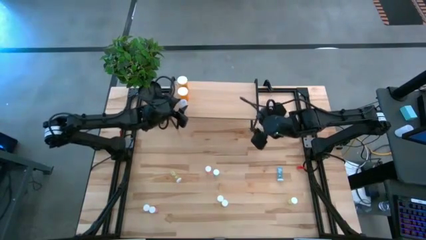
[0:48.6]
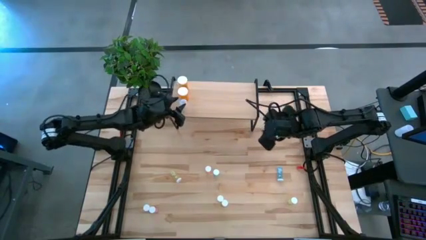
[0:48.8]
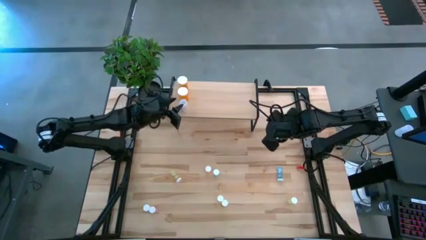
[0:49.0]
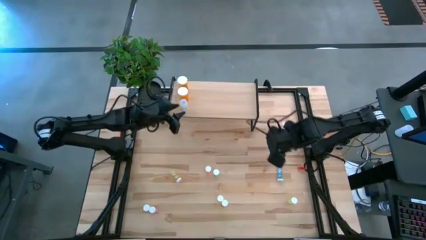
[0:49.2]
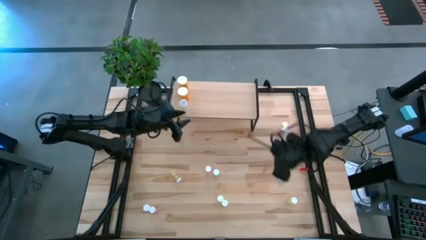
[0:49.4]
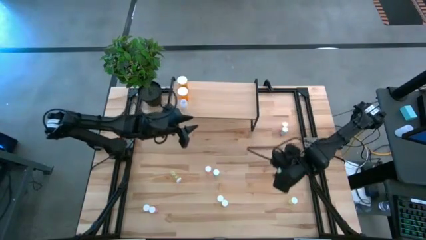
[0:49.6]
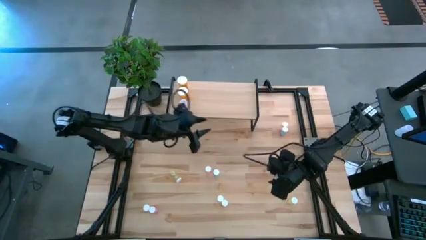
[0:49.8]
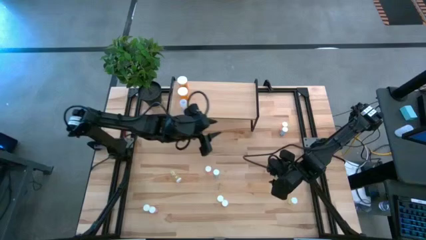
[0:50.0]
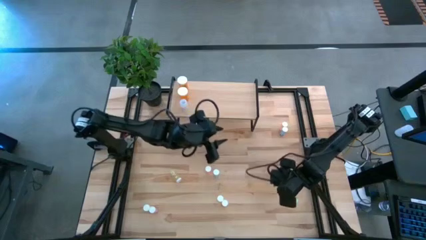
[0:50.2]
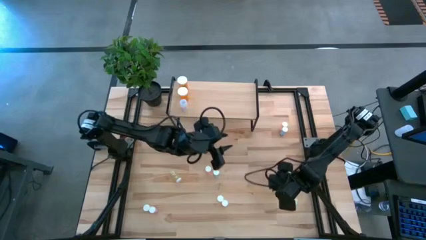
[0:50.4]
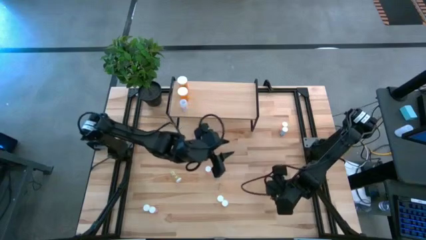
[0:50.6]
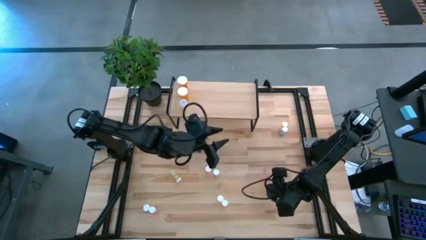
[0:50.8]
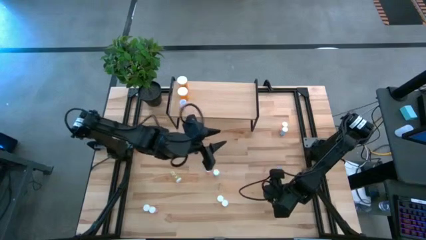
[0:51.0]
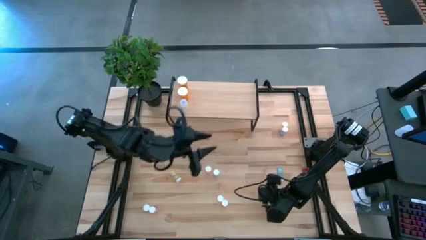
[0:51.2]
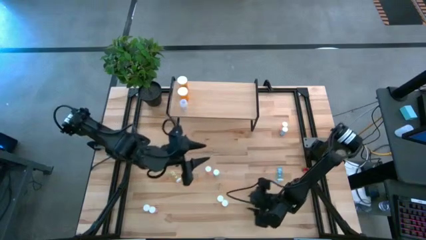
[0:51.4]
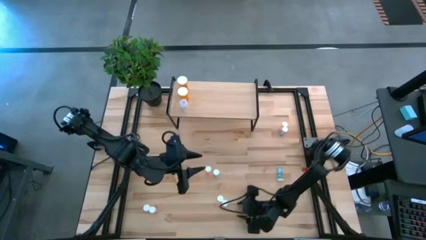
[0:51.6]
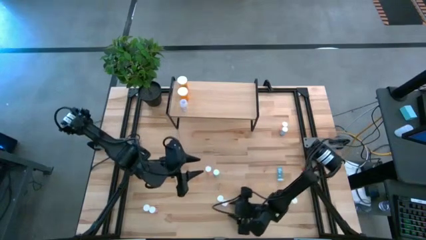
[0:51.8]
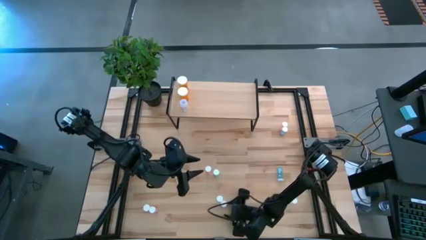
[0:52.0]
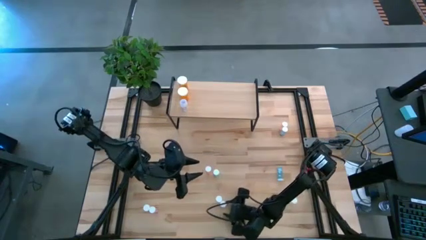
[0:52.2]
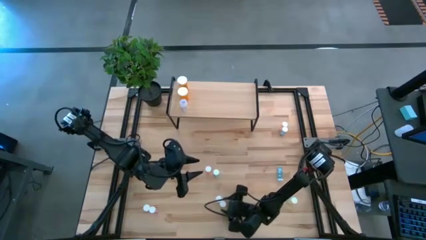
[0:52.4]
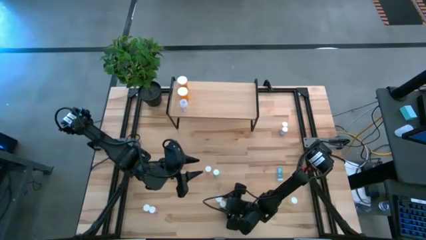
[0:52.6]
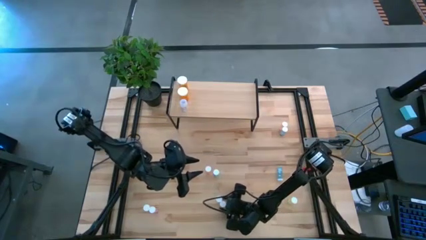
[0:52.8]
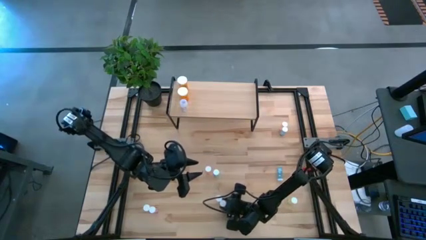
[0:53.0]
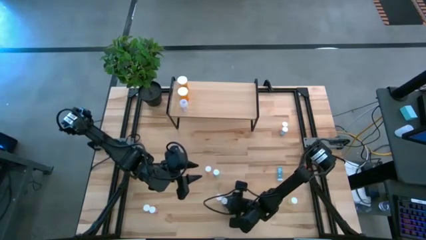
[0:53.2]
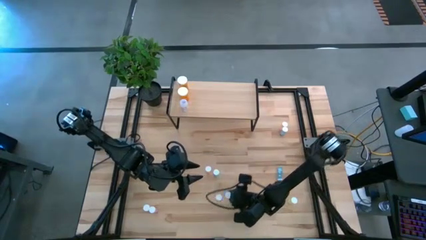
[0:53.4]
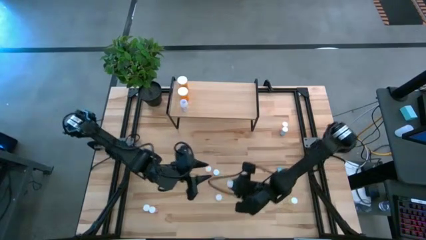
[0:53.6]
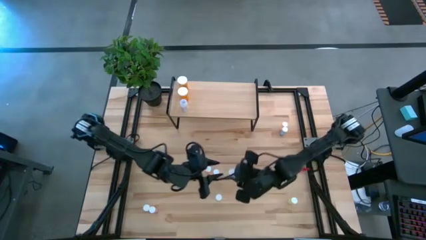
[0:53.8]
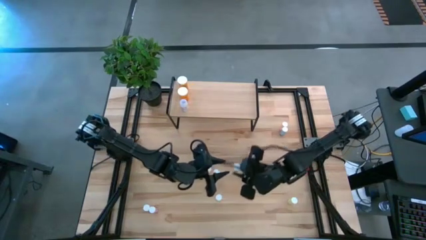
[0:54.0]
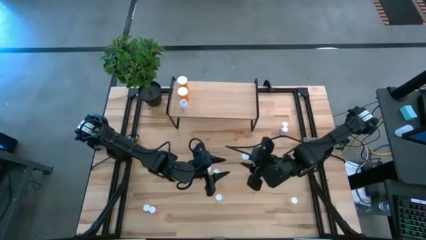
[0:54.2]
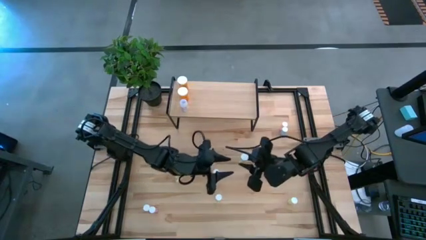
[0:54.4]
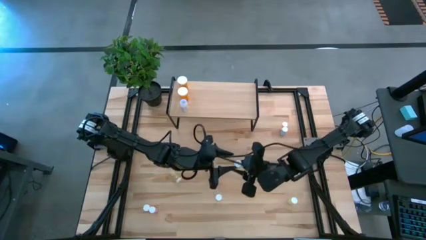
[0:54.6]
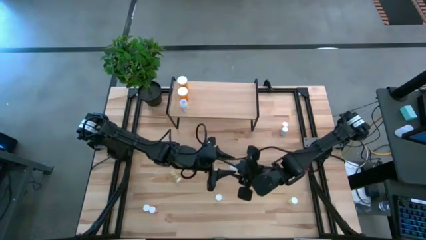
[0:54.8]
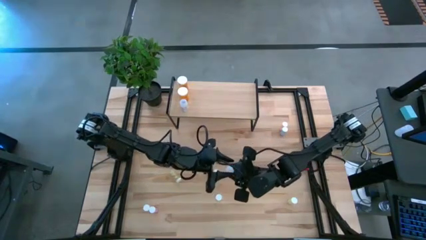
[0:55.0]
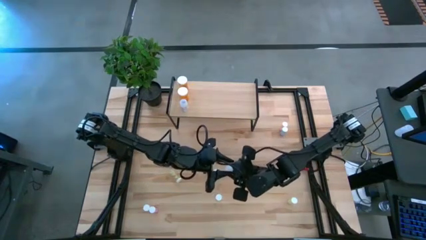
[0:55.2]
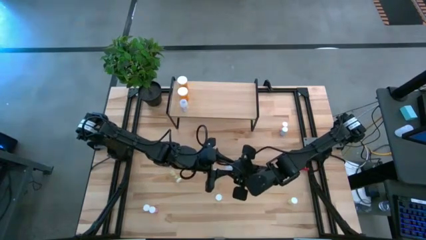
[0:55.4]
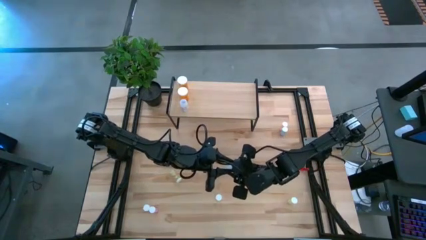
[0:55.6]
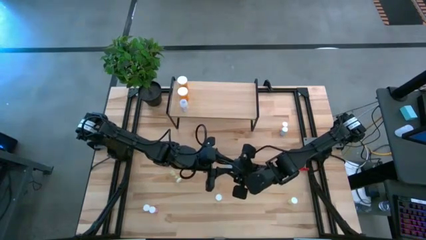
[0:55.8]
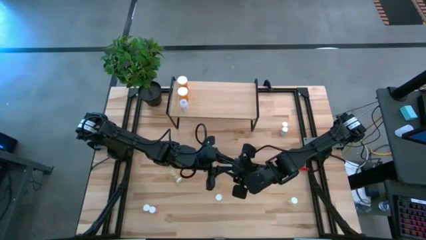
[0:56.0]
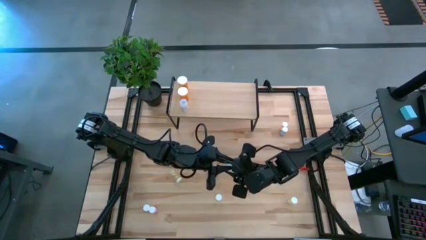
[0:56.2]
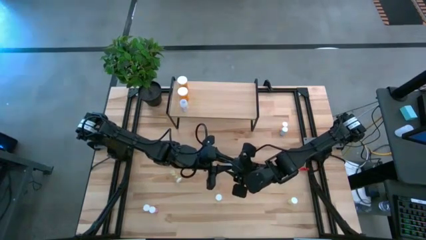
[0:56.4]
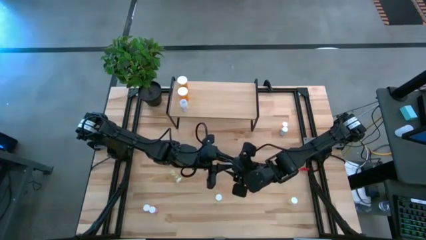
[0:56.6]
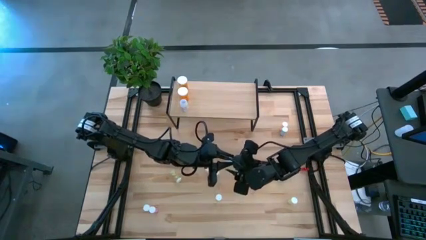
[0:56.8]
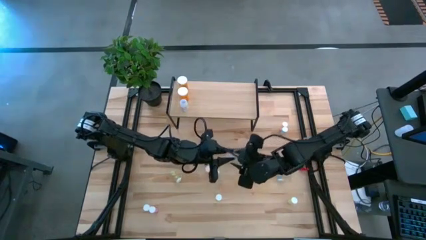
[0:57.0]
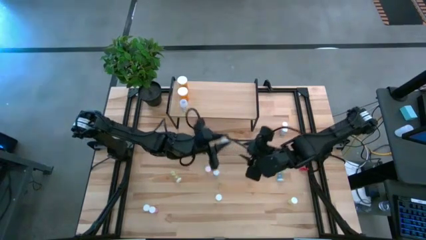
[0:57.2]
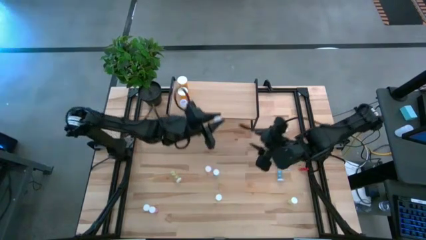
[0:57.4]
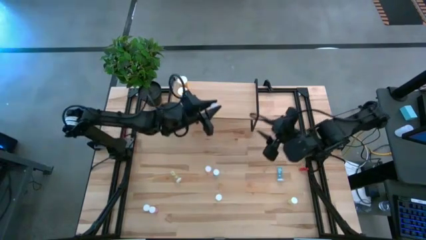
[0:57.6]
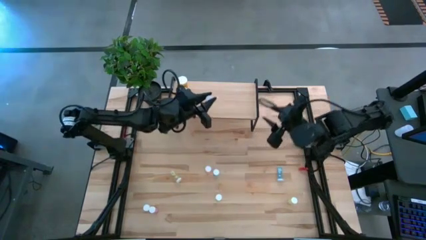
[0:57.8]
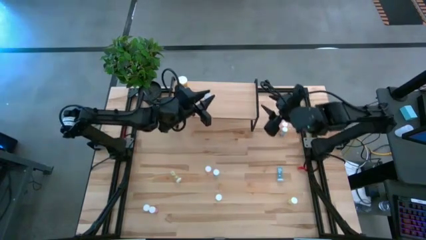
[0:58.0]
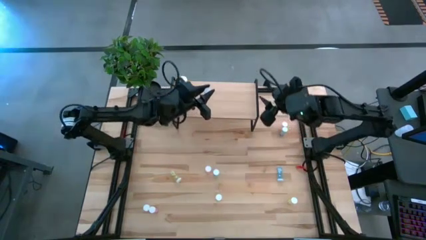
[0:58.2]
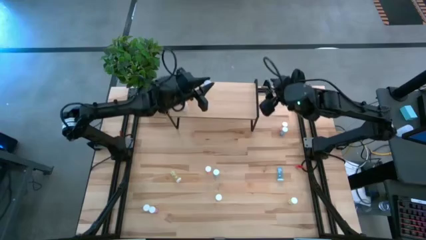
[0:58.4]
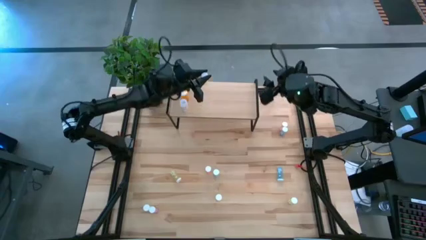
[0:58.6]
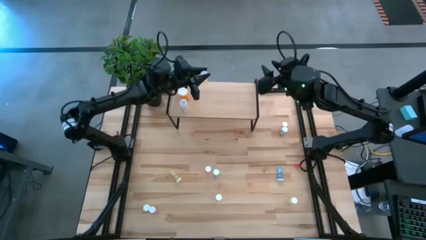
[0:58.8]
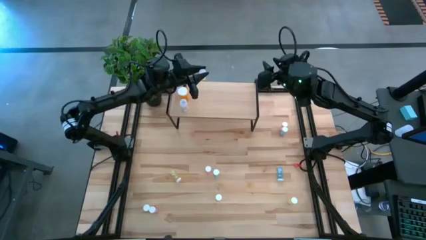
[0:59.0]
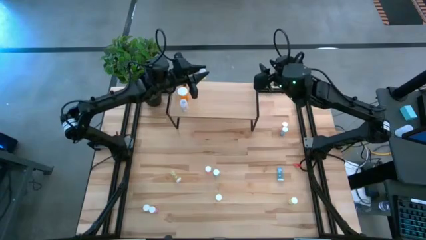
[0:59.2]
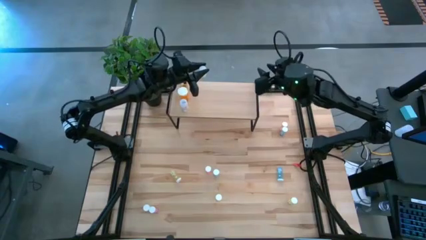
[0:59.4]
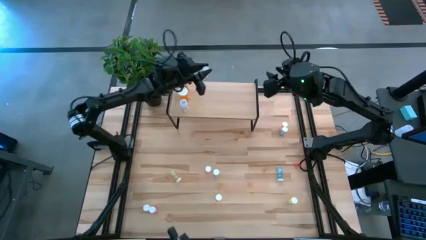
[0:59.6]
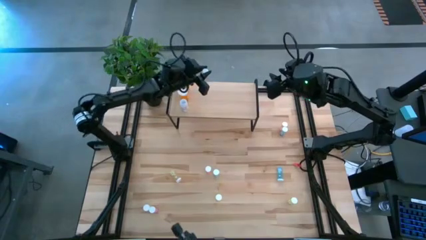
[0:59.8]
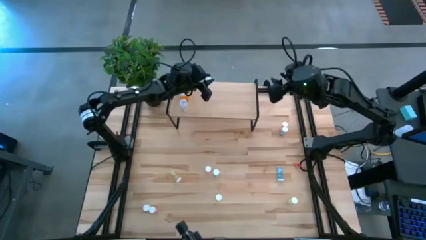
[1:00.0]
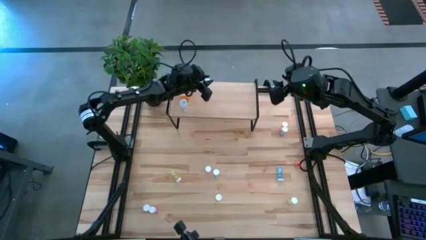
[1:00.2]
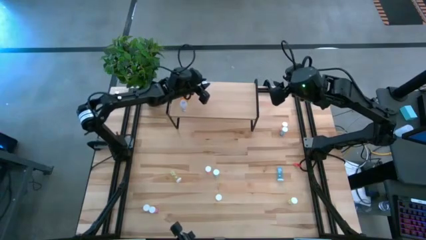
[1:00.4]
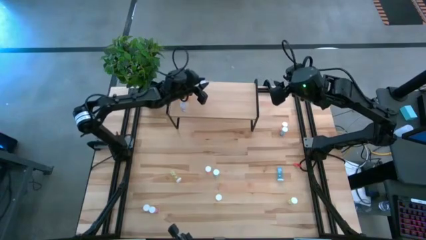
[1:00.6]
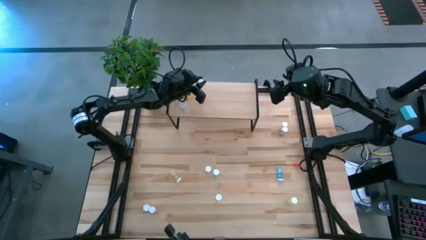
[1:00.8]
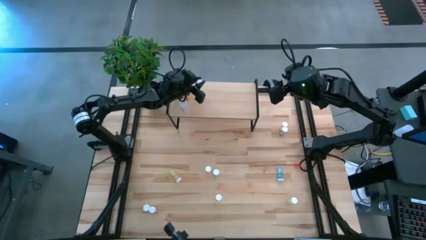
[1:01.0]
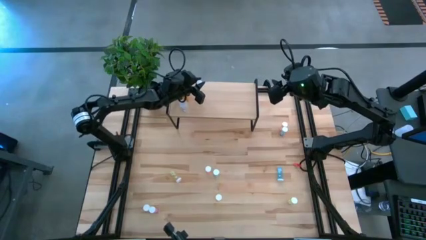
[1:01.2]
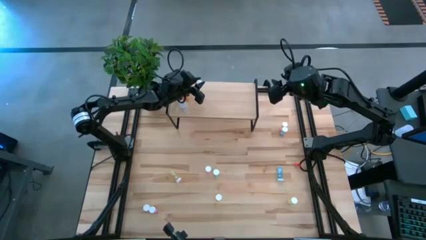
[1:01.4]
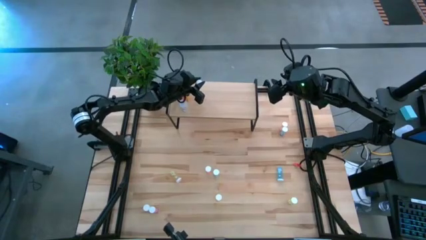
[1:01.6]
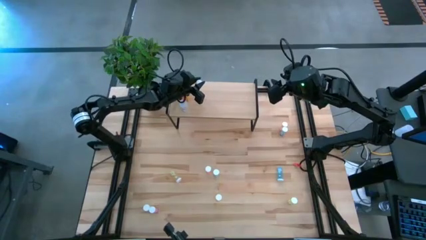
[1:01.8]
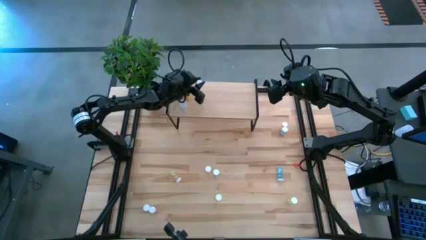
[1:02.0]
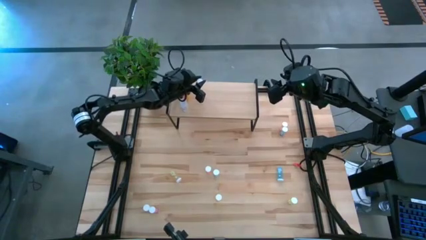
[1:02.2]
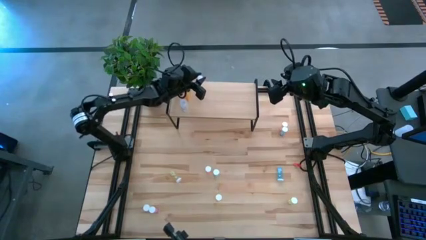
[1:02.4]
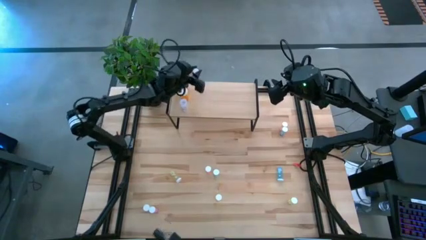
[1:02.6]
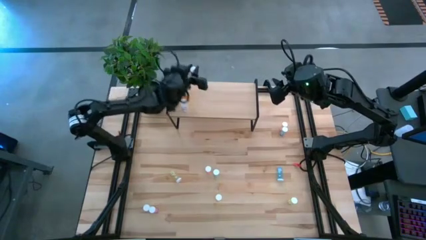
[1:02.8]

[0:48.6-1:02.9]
Task: Pick and place medicine bottles onto shelf by color
Put the yellow pill bottle on the shelf

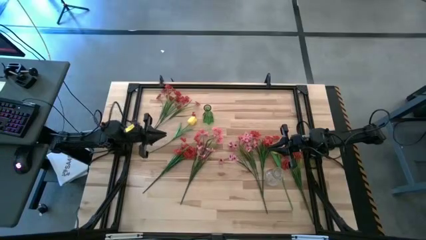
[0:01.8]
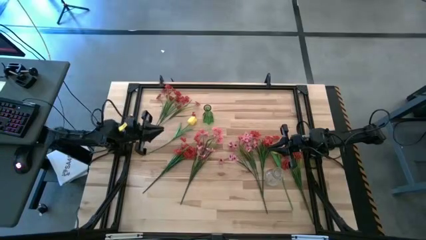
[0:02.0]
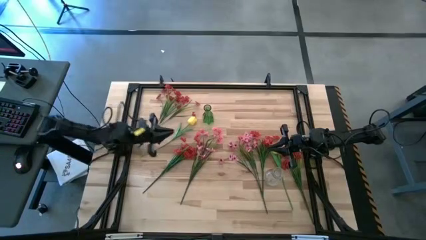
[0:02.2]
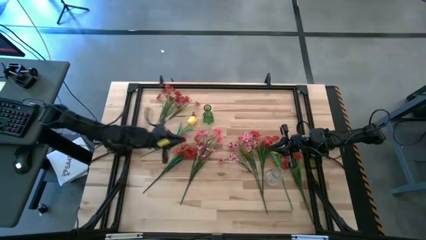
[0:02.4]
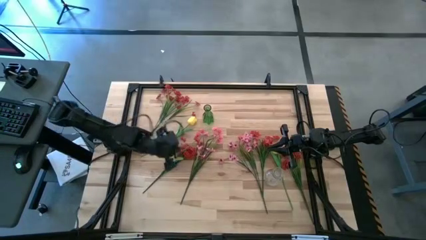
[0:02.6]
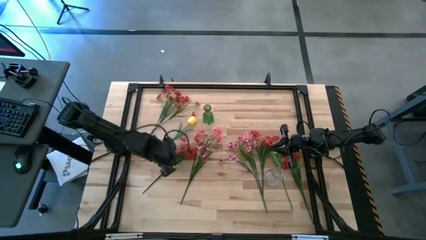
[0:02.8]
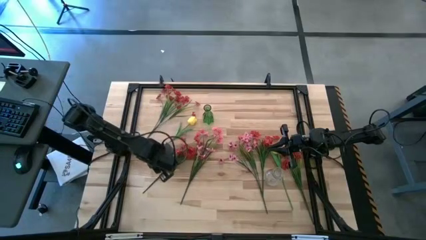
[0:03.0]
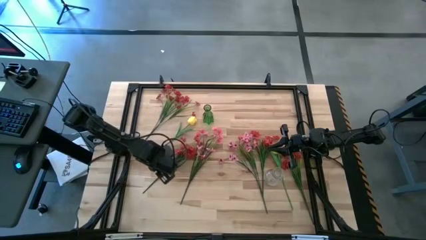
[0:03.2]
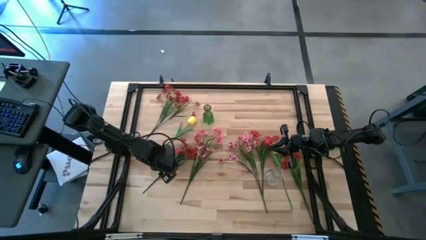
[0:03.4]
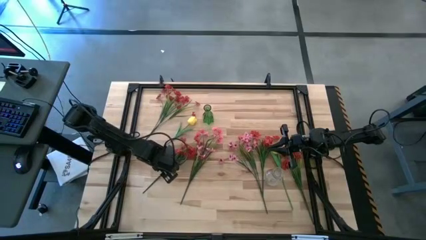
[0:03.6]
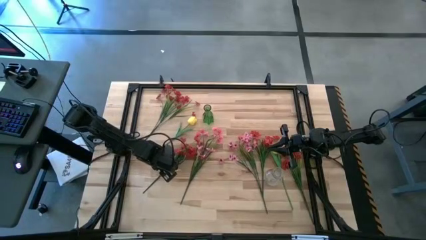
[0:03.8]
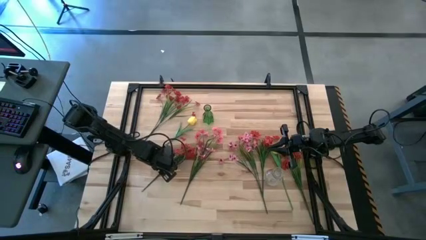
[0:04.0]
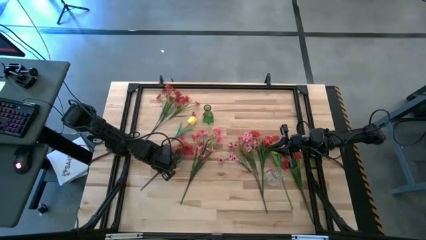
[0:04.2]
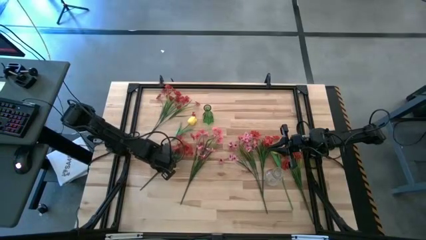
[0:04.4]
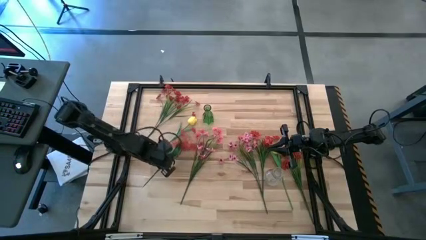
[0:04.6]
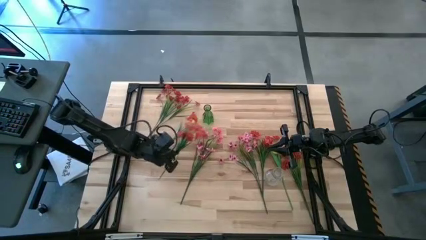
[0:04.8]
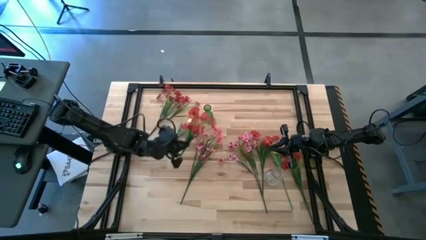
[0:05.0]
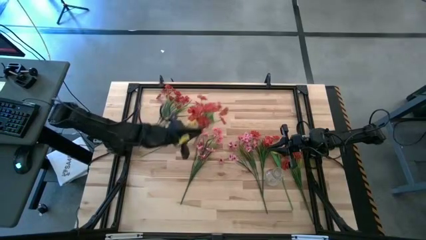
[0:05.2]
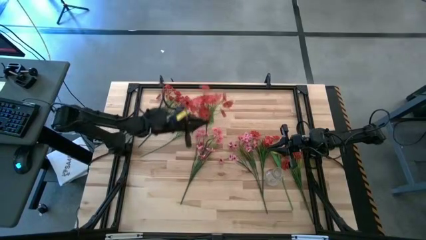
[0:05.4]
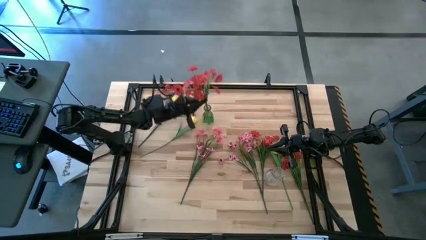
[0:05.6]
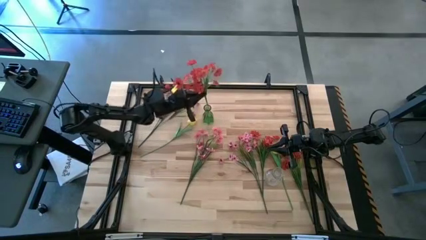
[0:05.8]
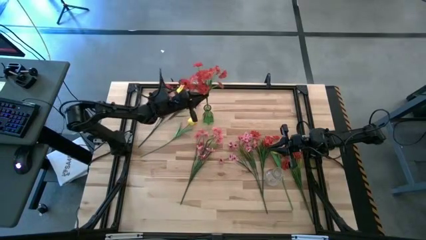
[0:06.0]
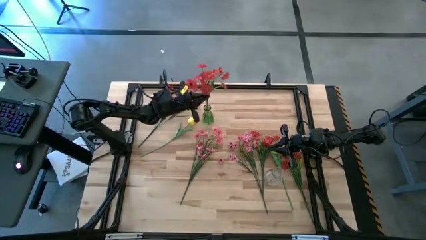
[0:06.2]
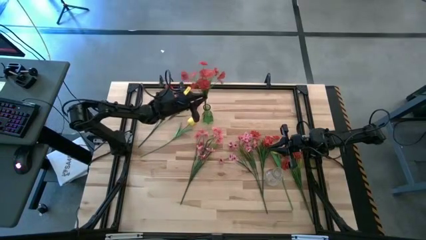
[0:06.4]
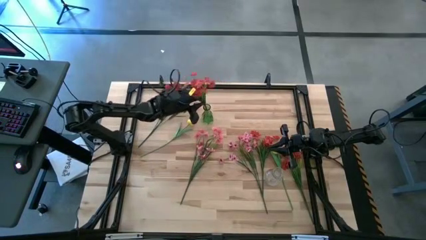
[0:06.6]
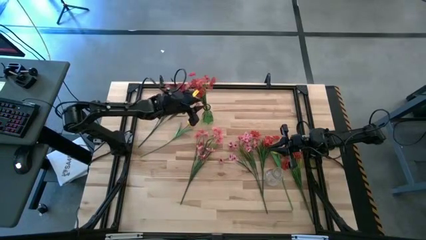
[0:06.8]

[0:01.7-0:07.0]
Task: Sort flowers into vase by color
Put the bottom left red flower into the green vase
